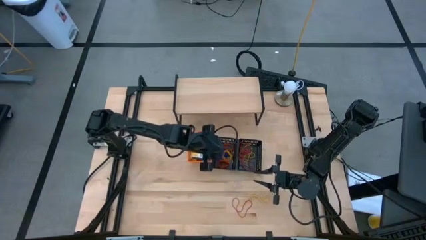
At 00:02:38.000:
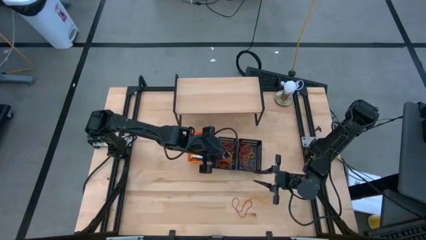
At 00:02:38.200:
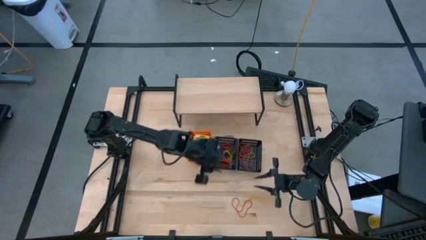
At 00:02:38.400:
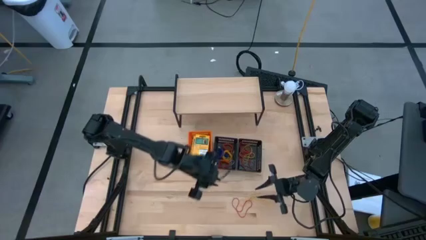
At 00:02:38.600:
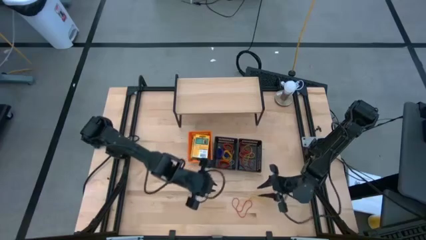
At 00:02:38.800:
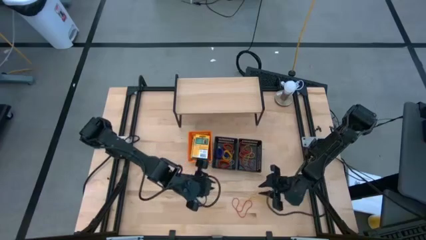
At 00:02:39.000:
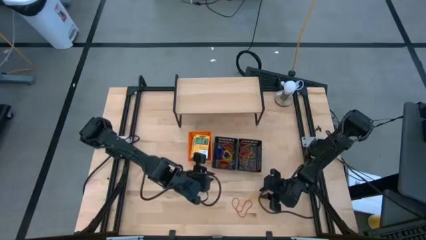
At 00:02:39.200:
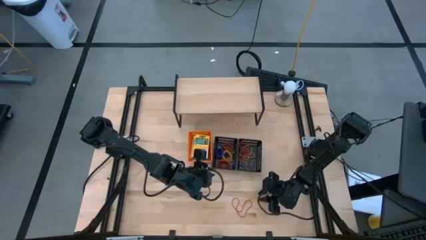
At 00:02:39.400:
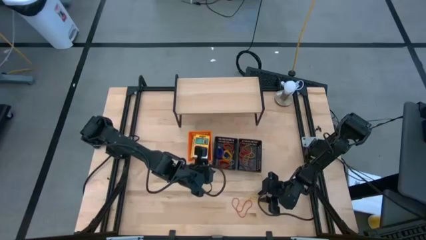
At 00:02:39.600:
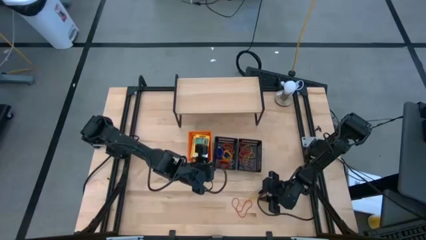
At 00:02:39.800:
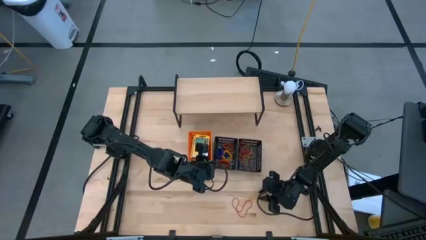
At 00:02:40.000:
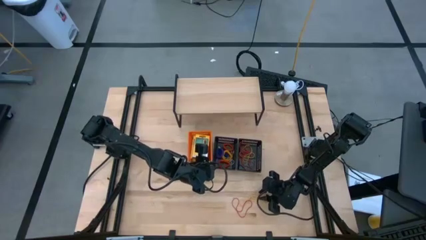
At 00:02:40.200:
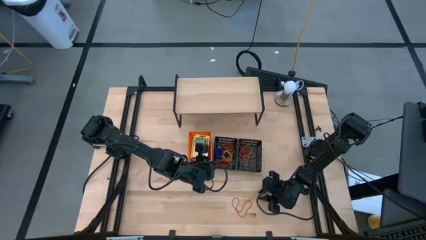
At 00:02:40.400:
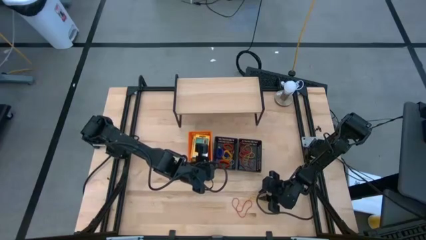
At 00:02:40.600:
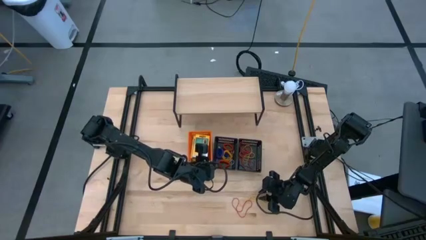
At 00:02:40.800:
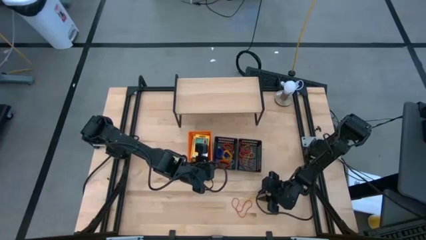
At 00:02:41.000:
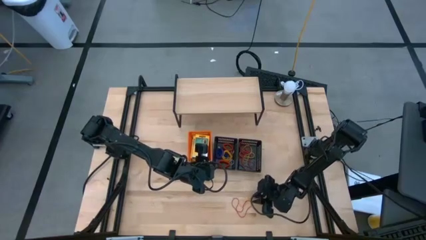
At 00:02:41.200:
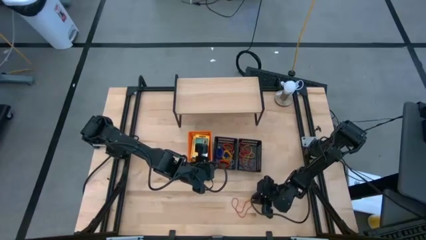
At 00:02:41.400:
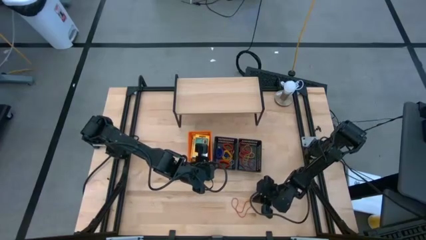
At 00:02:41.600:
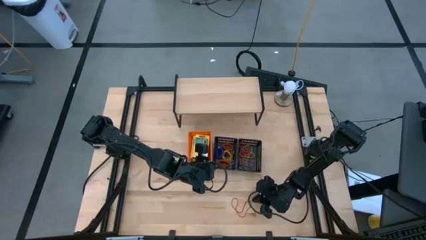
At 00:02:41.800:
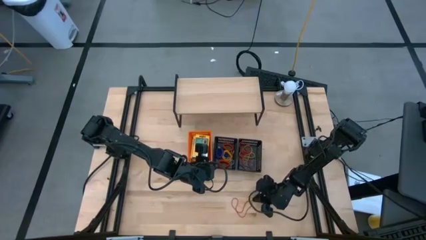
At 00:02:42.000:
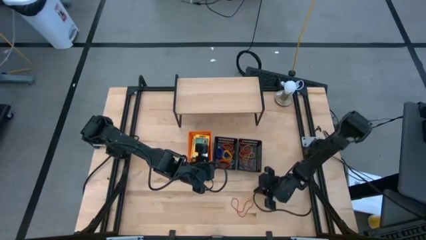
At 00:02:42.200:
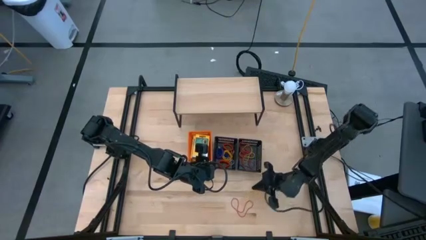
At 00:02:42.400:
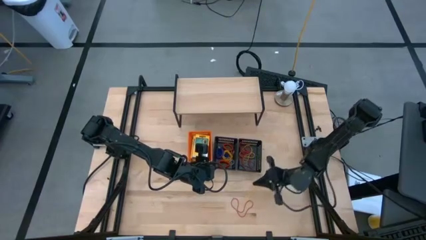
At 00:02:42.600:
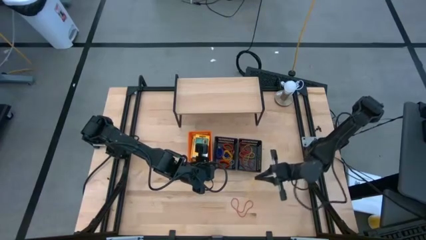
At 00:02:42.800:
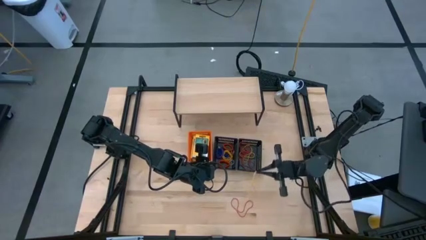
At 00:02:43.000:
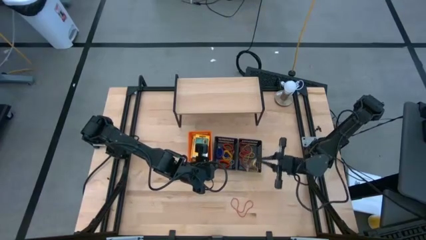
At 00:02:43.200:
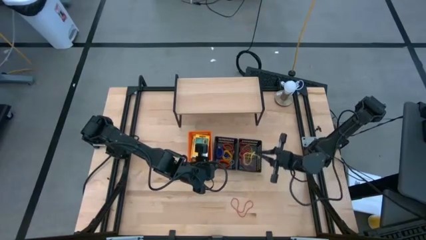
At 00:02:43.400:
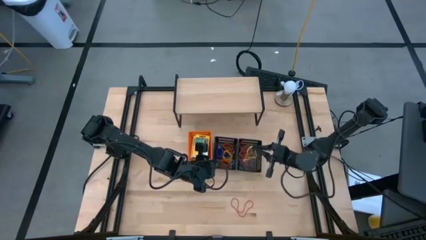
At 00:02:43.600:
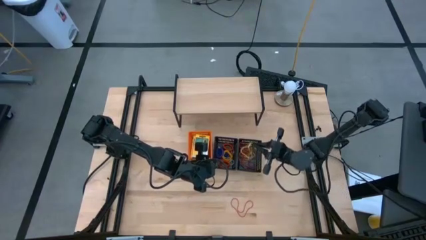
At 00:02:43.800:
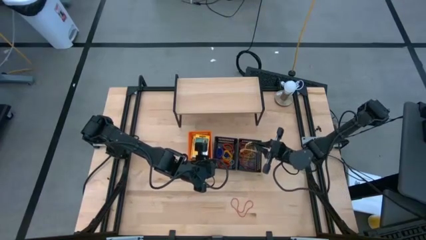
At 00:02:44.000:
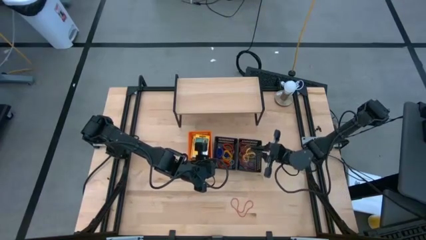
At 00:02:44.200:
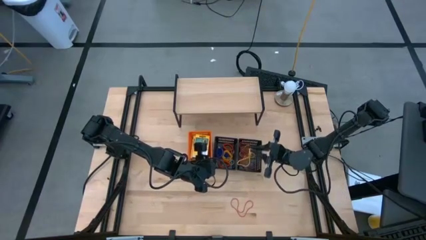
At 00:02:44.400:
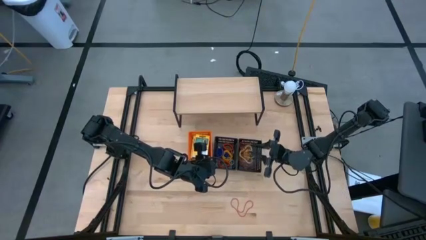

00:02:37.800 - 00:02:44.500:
Task: Pick & Place Office Desk Supplies
Put the yellow rubber band into the right black bin

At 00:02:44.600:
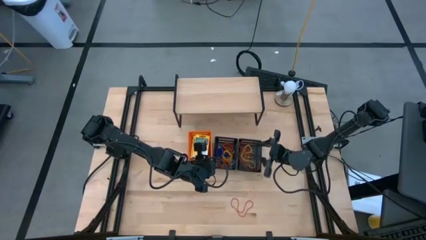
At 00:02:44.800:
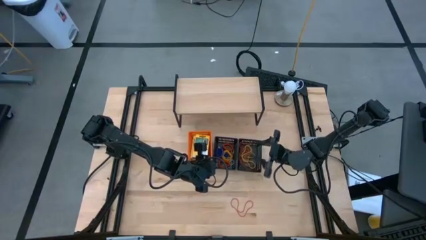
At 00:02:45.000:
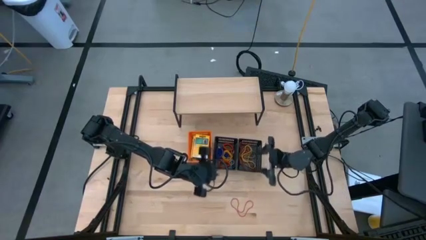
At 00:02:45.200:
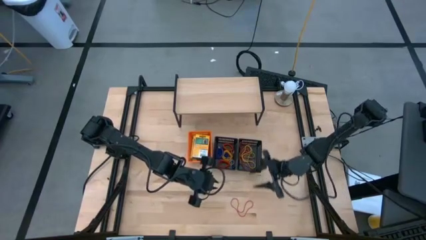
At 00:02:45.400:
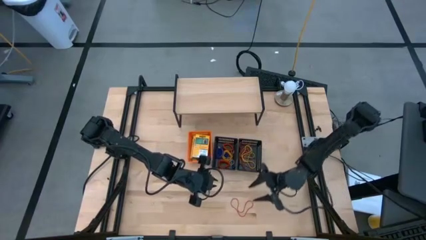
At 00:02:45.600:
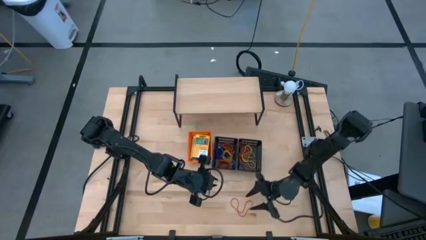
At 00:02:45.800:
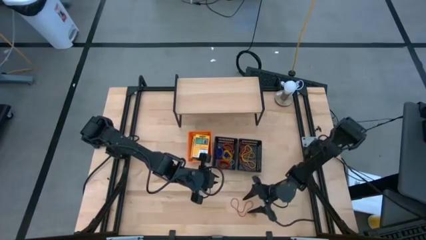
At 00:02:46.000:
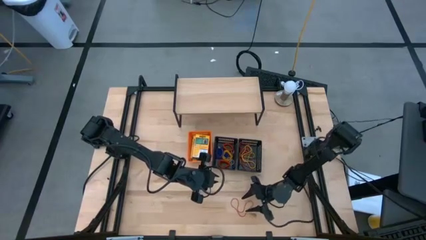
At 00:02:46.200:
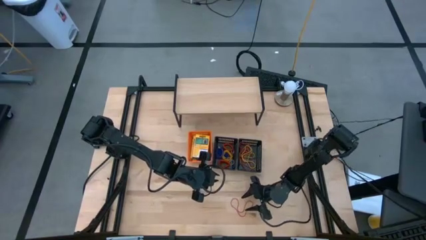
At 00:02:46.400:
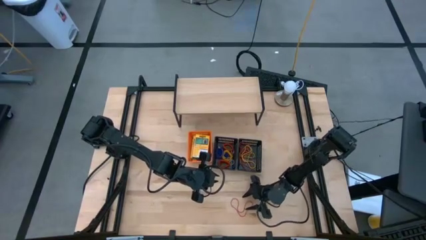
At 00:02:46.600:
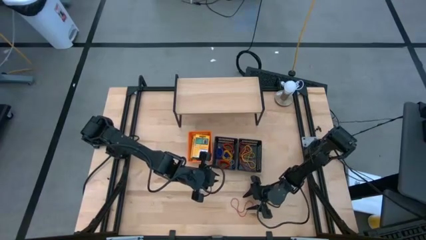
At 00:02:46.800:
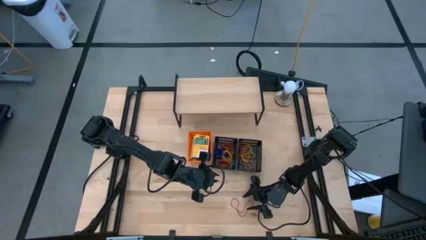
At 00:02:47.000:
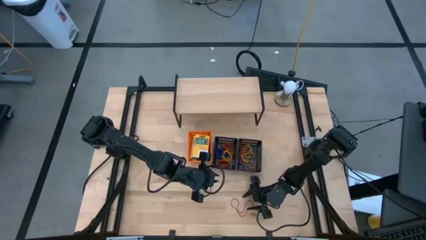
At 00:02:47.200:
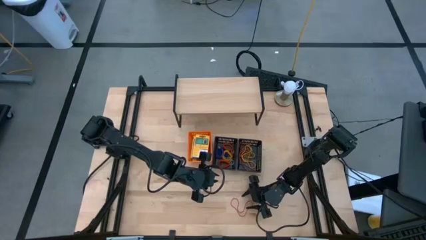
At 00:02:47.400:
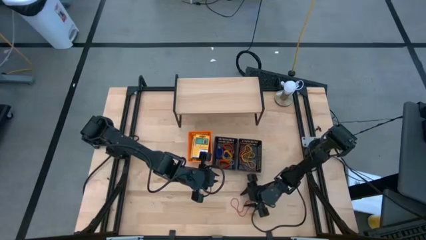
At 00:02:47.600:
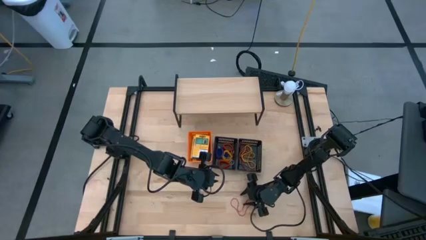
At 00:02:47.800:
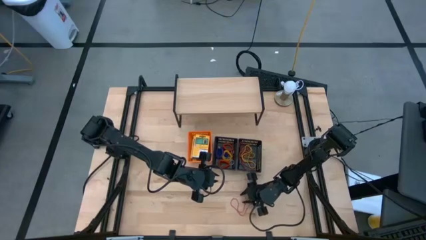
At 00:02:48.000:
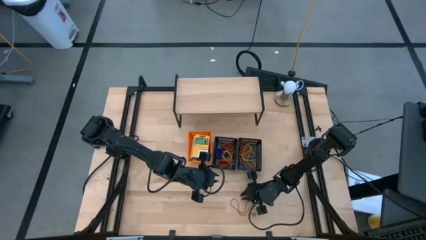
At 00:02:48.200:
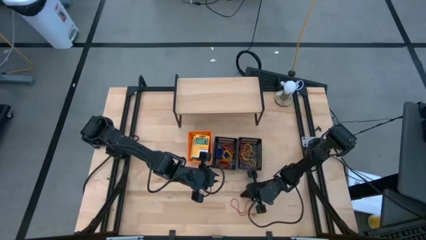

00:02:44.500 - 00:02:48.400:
Put the red rubber band into the right black bin

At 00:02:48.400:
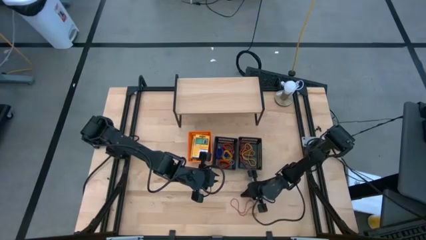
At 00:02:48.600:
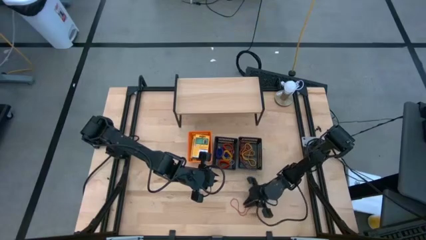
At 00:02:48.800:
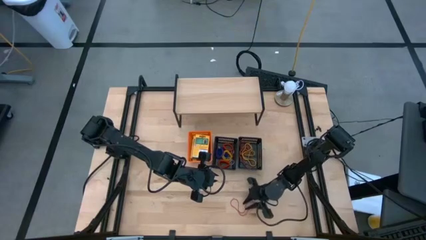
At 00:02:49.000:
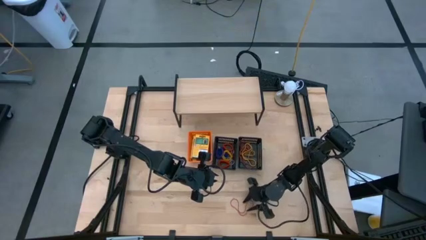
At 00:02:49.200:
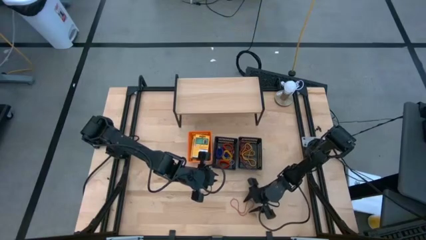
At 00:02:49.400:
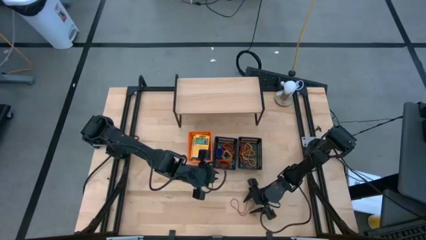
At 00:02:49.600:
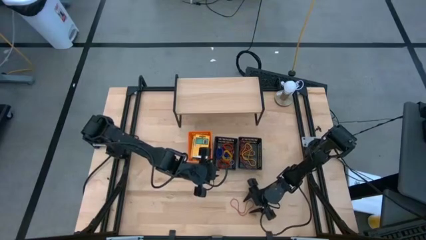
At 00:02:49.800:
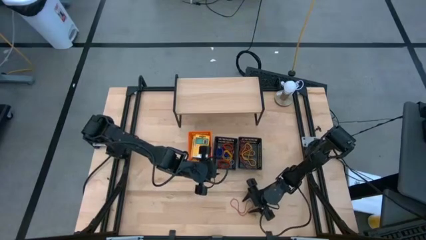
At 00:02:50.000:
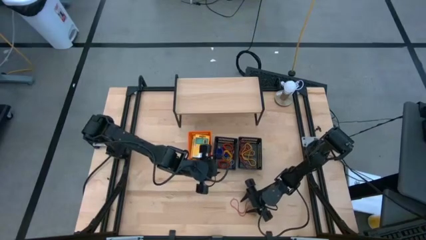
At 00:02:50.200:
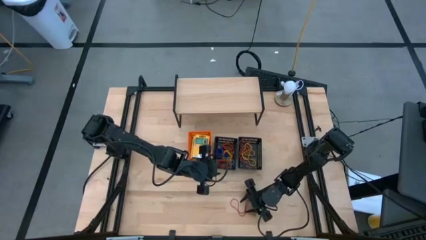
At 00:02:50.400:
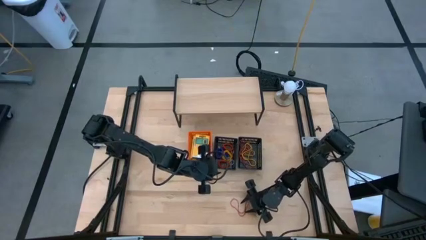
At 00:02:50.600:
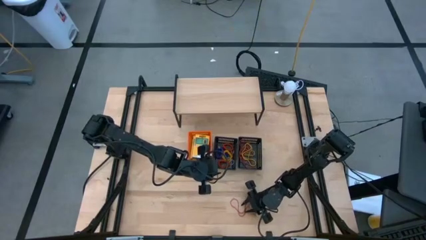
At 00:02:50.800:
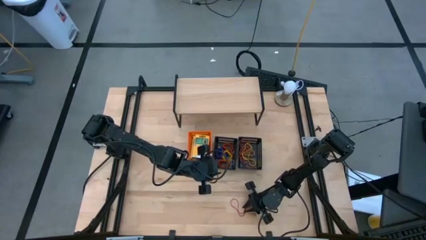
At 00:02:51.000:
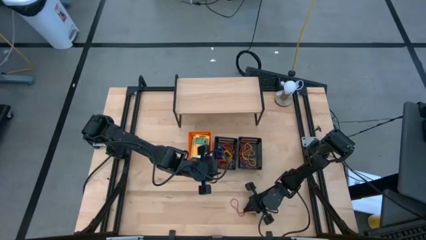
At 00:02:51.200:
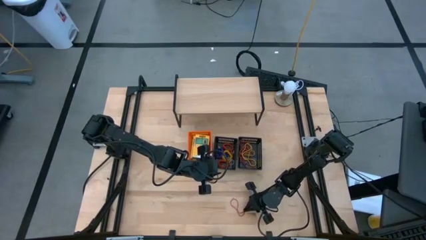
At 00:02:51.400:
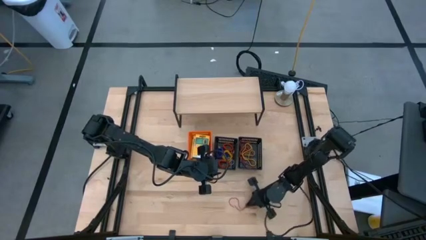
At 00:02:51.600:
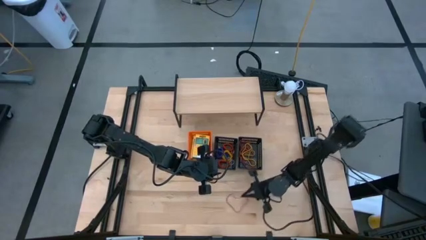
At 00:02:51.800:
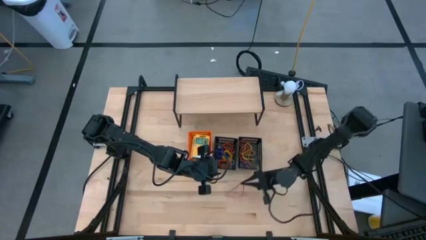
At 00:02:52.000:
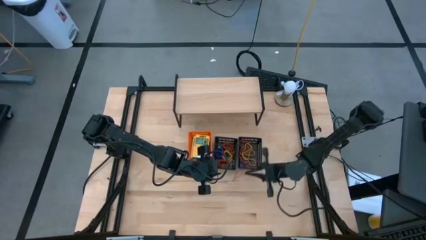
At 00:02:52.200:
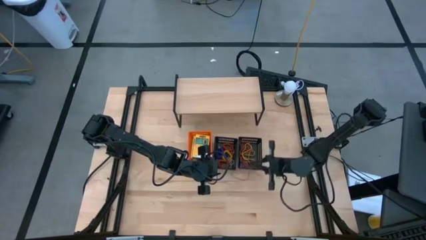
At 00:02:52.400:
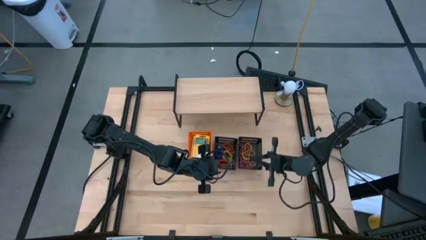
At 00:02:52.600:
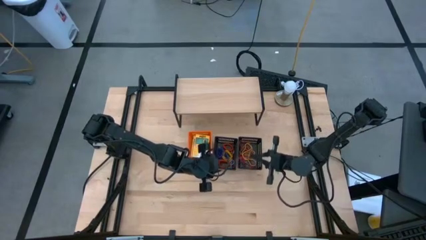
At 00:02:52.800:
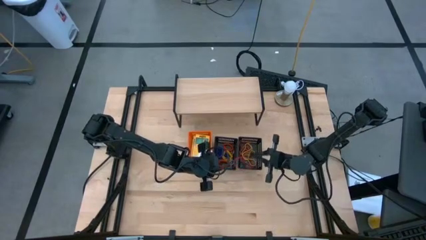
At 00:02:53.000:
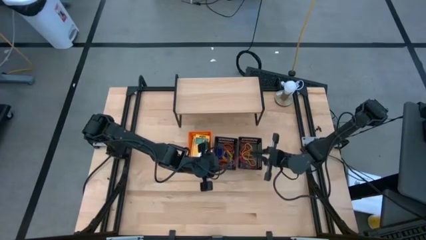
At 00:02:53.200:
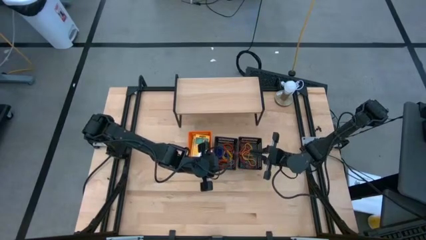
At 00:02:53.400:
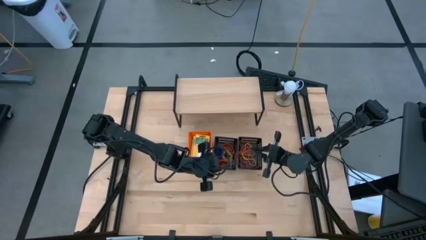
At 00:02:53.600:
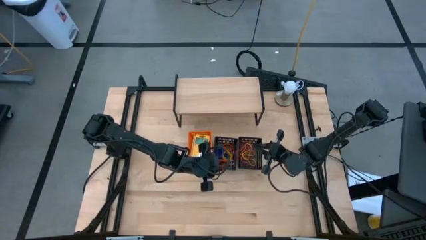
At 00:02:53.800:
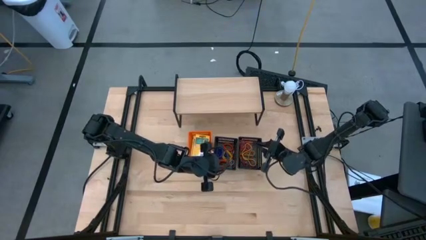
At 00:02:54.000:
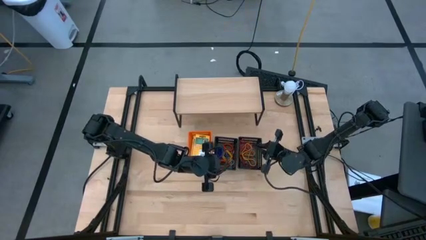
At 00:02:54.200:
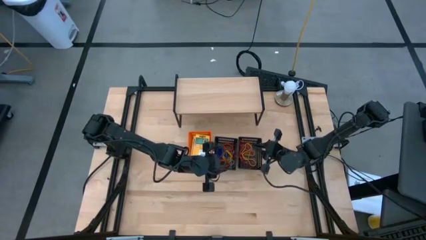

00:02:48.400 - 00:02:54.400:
Put the red rubber band into the right black bin
